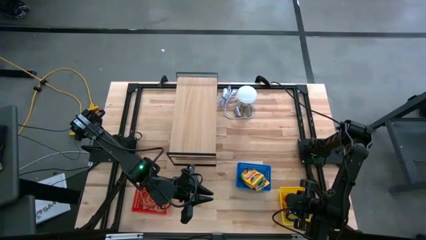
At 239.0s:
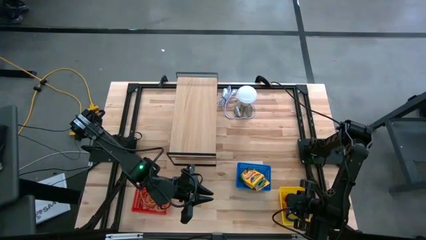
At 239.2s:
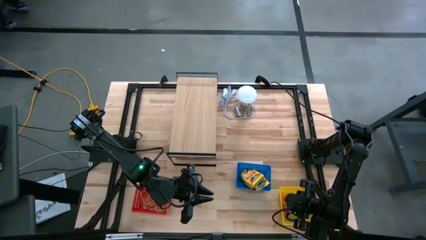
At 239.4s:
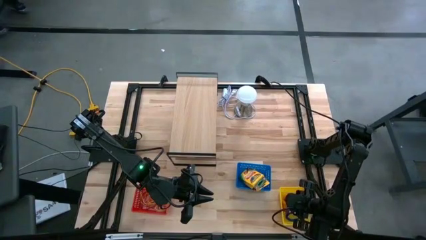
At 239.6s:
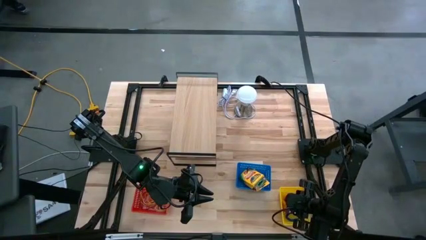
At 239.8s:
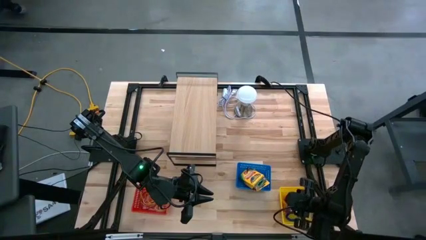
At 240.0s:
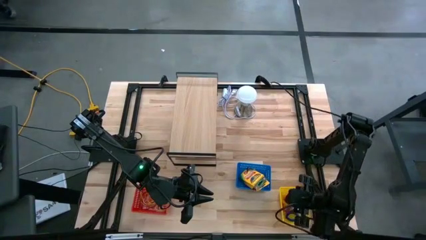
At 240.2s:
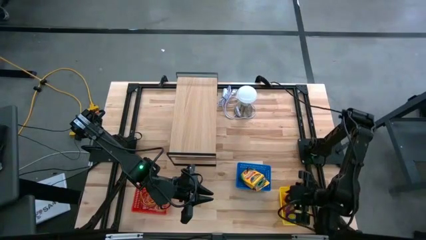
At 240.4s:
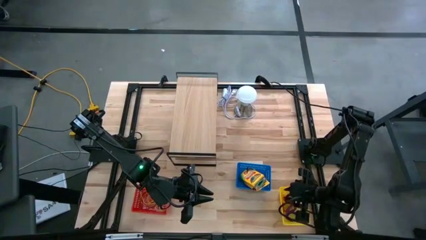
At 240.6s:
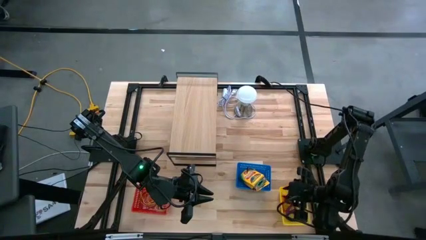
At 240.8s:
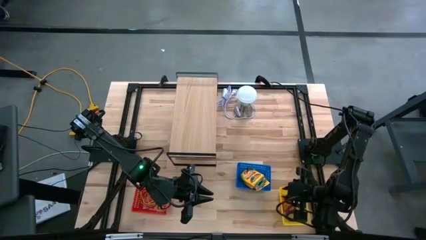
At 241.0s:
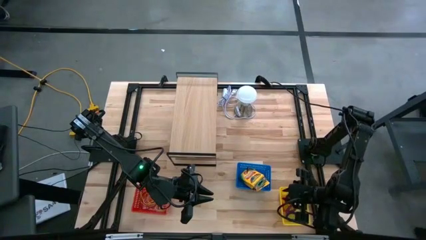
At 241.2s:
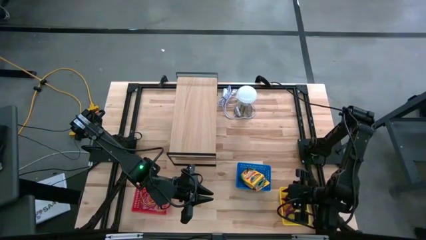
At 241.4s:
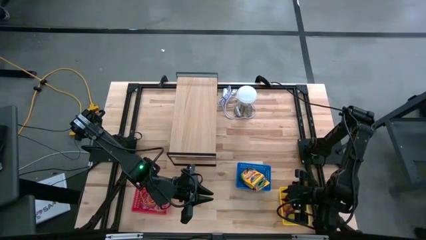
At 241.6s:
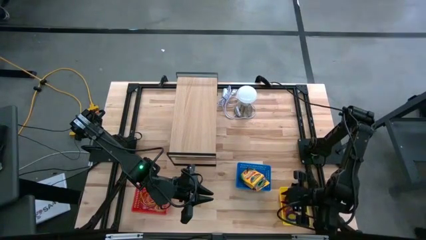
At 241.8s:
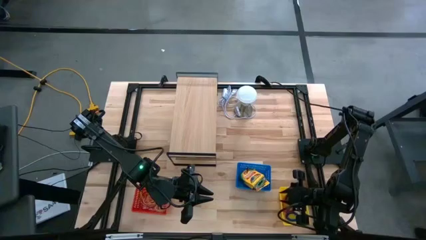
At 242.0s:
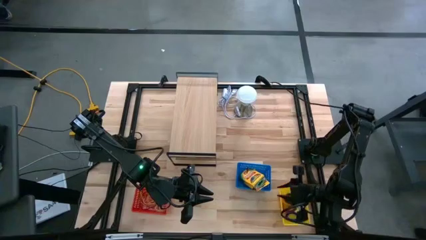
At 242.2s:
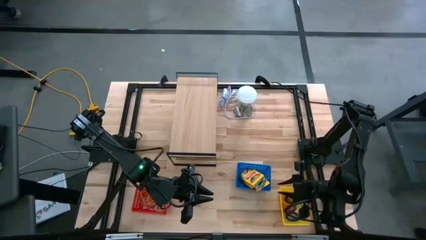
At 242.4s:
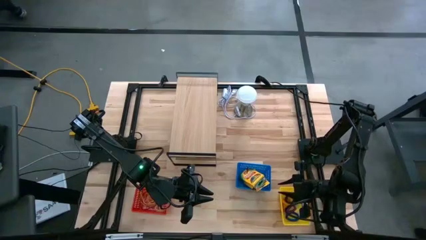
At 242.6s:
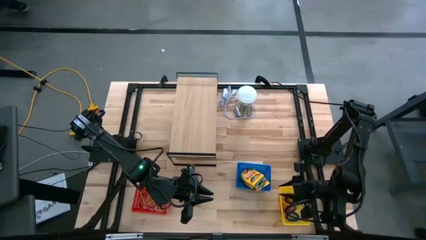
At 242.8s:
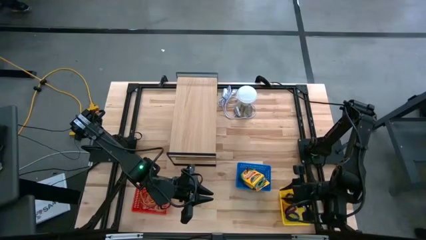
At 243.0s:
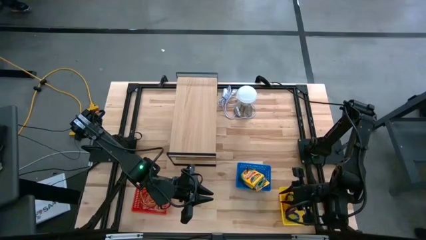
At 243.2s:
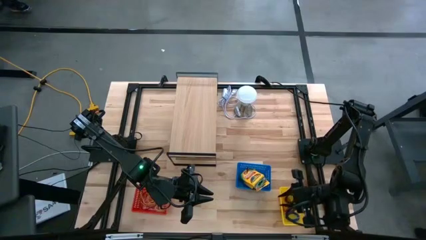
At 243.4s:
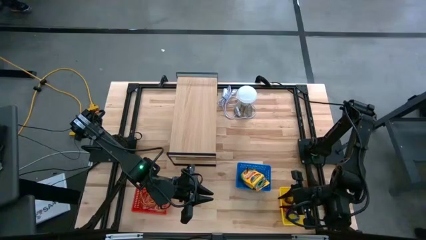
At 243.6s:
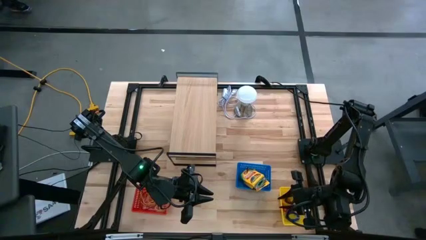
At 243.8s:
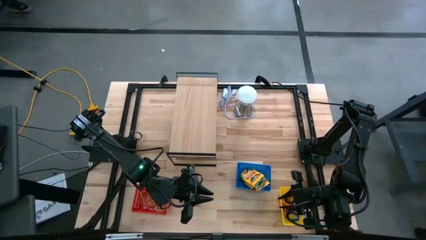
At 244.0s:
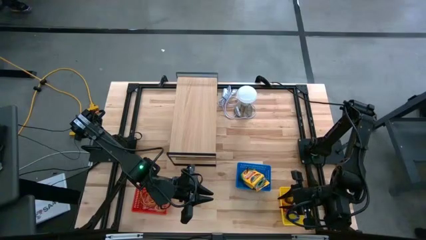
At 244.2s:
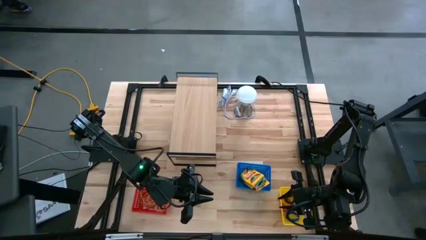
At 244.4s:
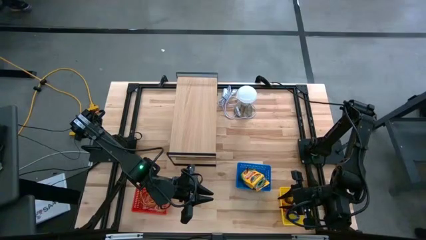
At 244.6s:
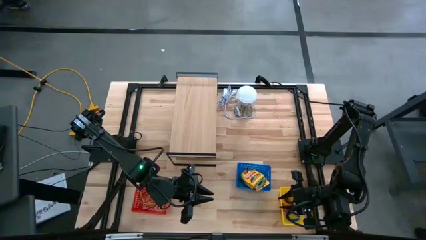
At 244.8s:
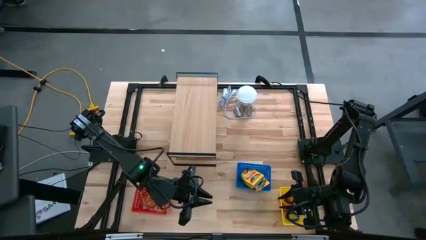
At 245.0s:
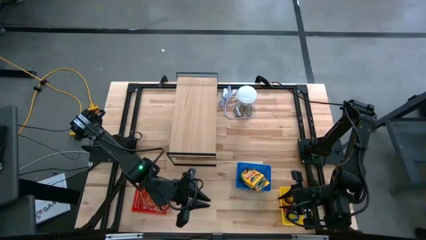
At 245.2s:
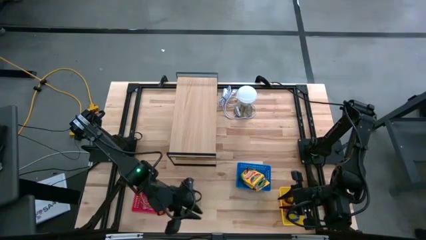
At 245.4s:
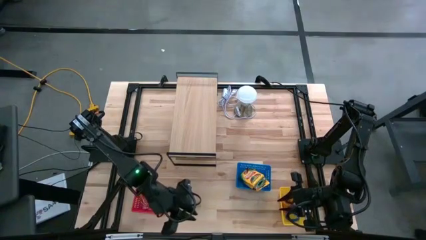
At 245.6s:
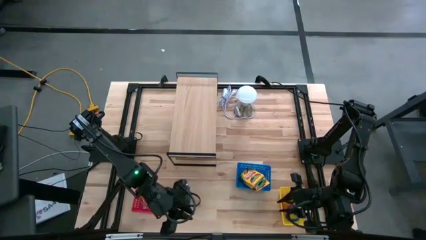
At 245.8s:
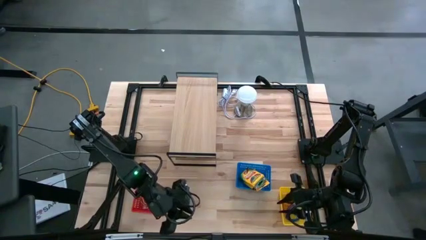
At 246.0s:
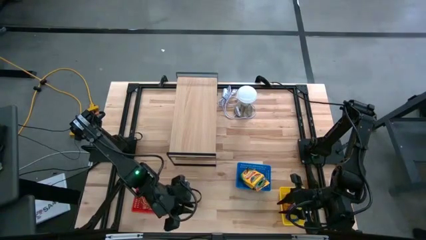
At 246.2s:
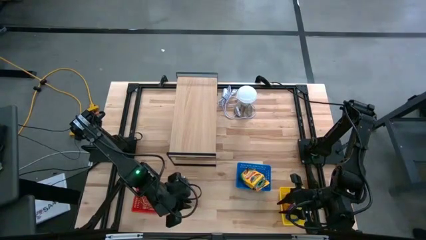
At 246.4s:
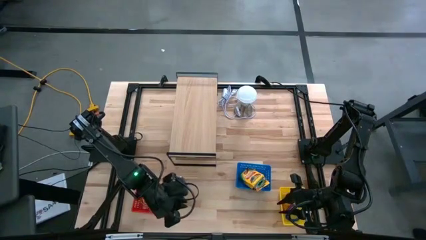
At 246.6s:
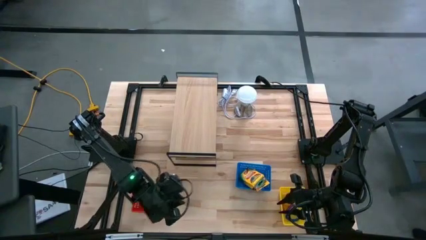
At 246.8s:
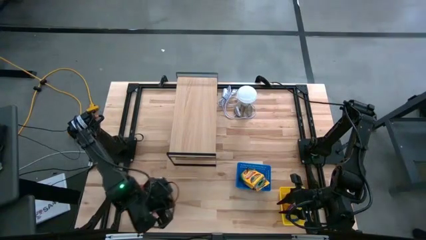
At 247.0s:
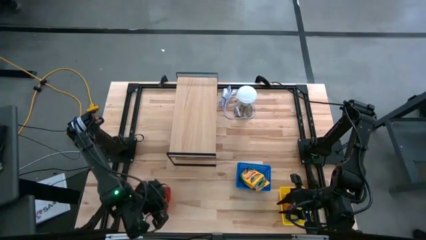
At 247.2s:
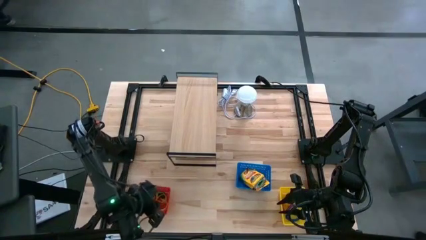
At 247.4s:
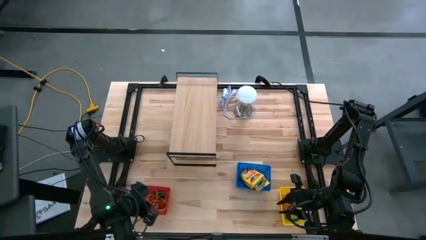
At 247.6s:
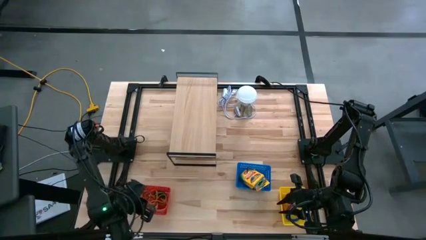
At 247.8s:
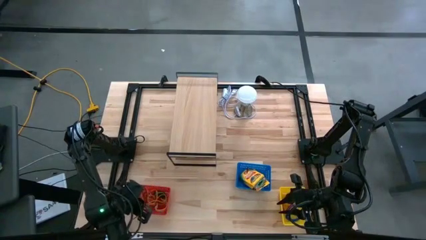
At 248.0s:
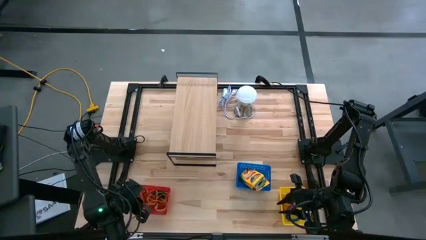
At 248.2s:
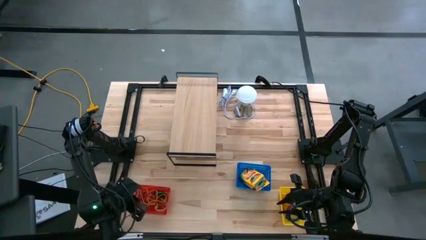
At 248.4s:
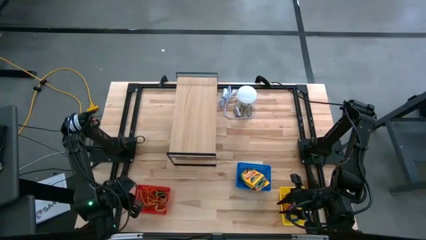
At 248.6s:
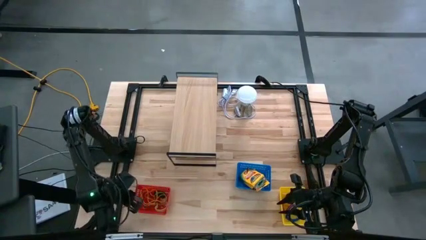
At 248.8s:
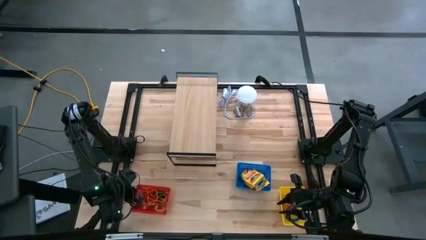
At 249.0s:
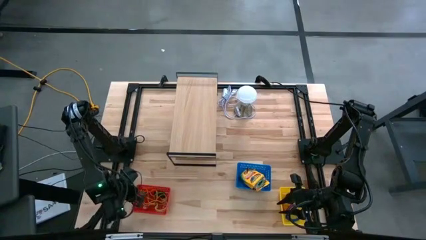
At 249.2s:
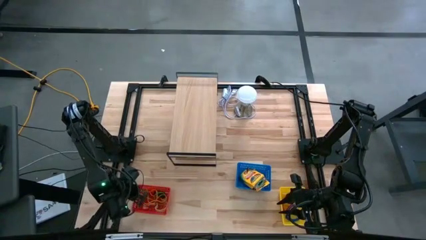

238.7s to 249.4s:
Task: Pick & Place Office Desk Supplies
Put the red bin on the shelf

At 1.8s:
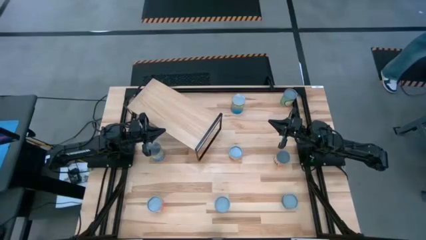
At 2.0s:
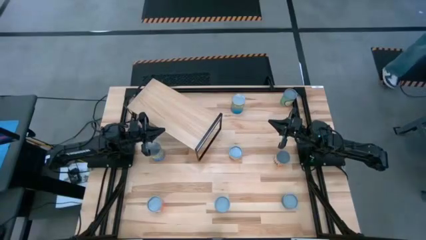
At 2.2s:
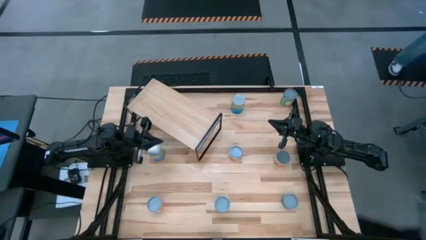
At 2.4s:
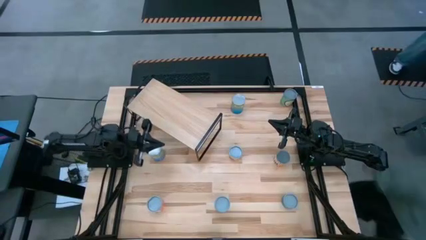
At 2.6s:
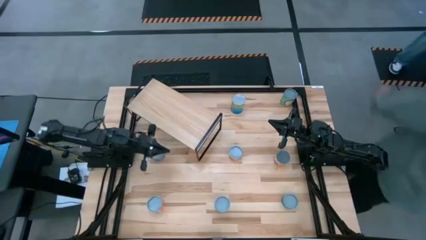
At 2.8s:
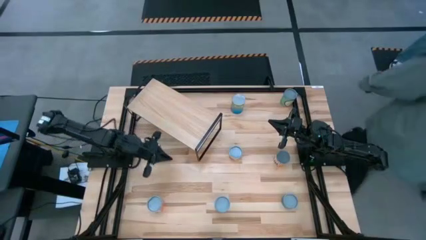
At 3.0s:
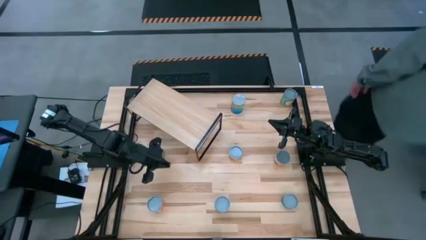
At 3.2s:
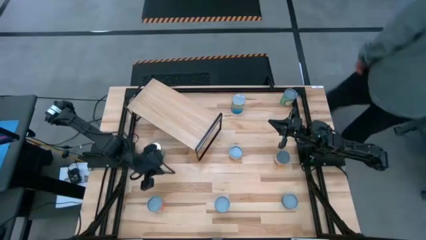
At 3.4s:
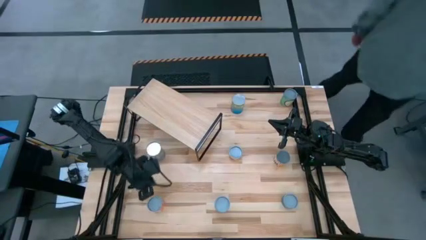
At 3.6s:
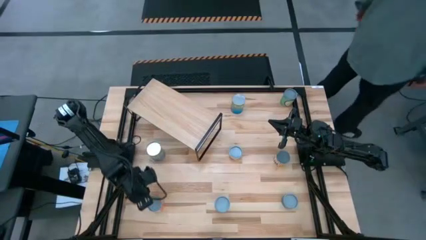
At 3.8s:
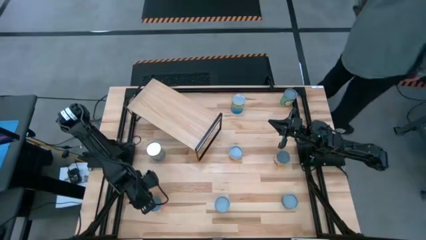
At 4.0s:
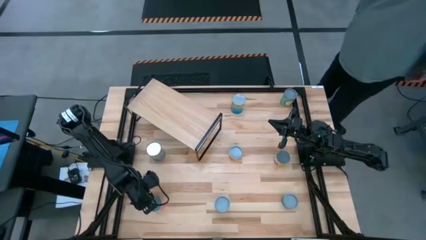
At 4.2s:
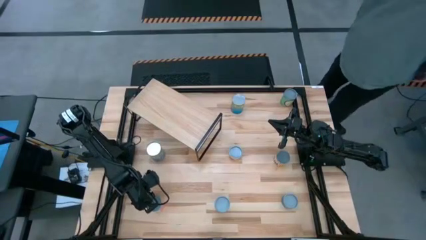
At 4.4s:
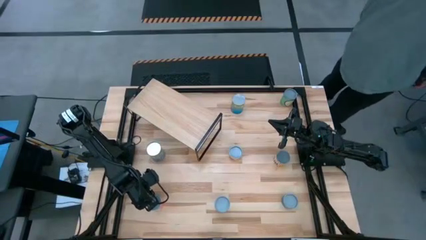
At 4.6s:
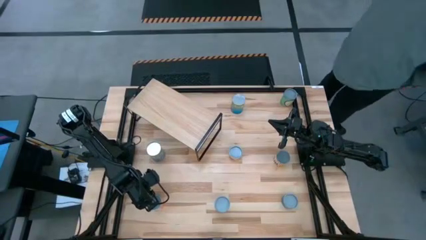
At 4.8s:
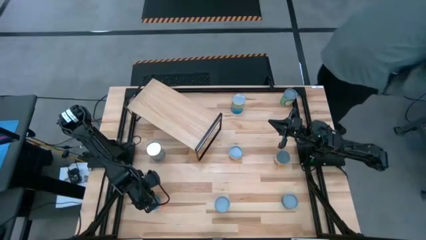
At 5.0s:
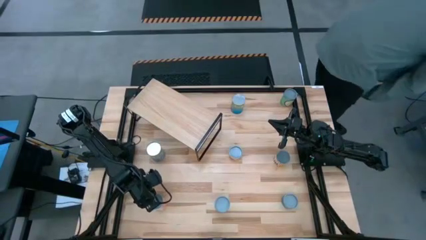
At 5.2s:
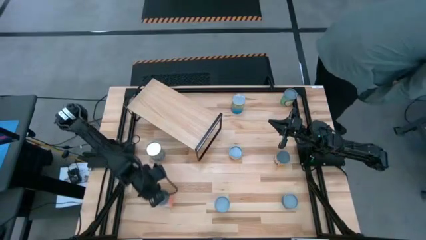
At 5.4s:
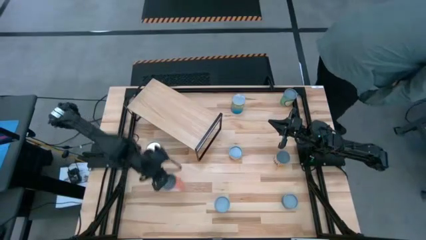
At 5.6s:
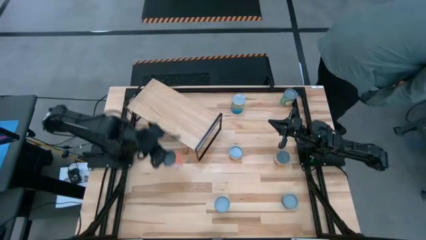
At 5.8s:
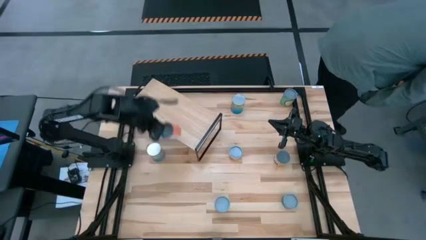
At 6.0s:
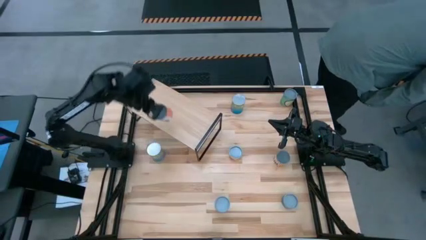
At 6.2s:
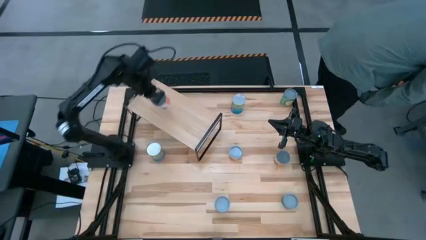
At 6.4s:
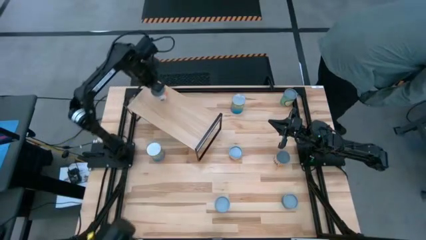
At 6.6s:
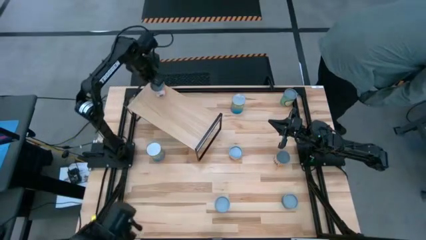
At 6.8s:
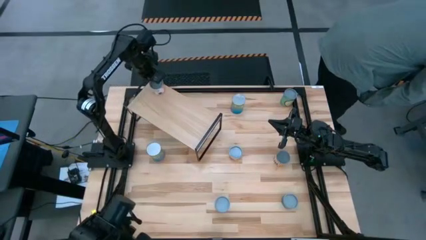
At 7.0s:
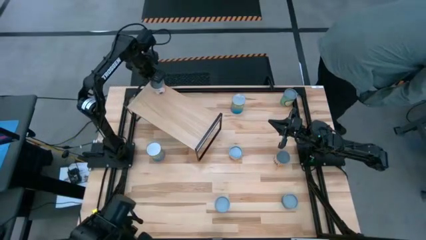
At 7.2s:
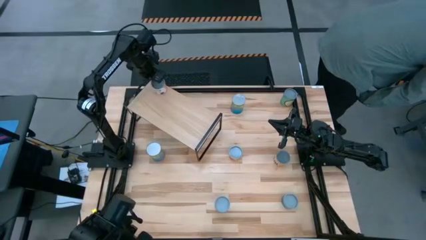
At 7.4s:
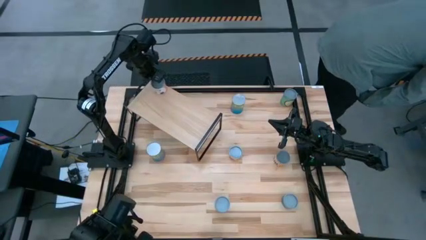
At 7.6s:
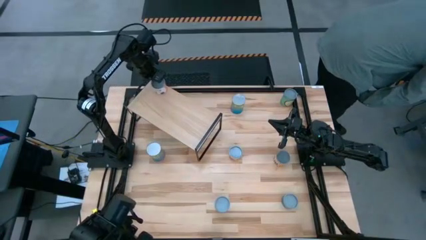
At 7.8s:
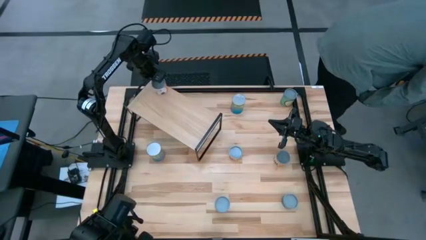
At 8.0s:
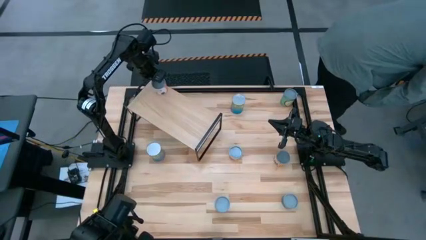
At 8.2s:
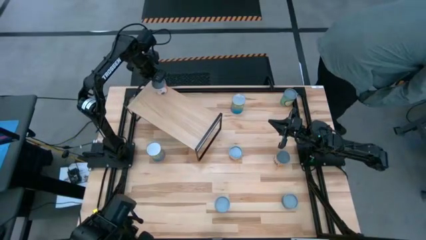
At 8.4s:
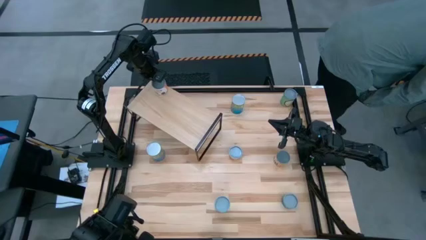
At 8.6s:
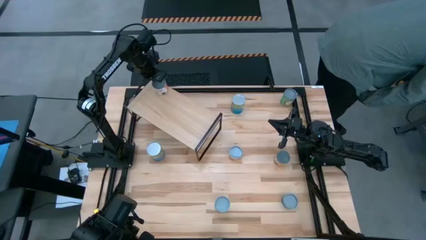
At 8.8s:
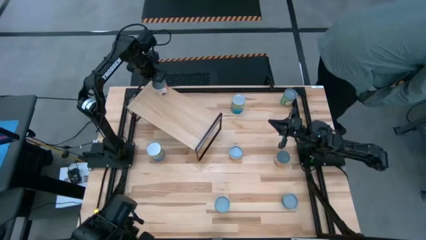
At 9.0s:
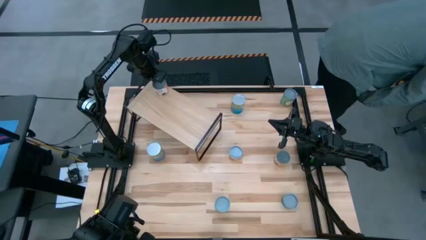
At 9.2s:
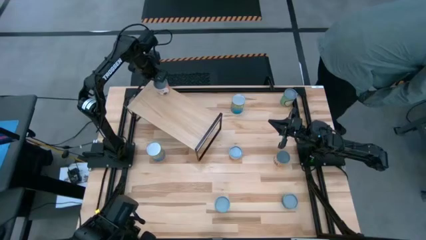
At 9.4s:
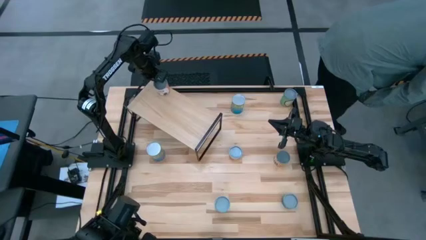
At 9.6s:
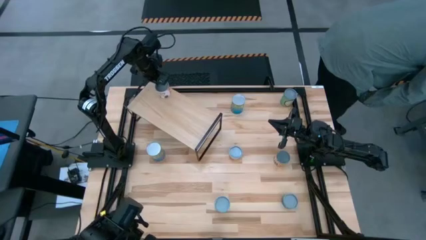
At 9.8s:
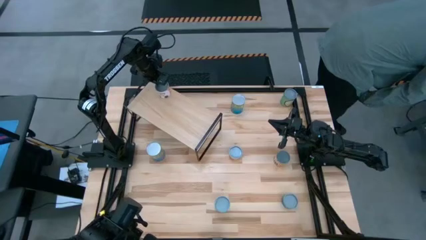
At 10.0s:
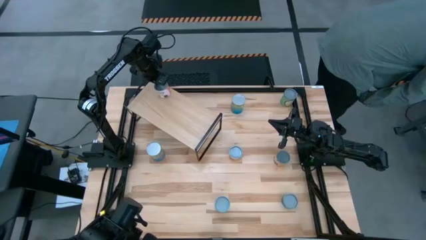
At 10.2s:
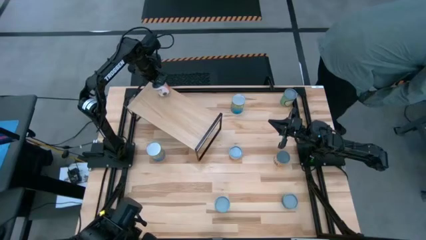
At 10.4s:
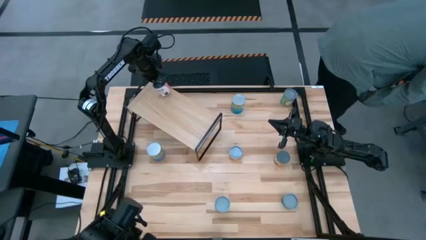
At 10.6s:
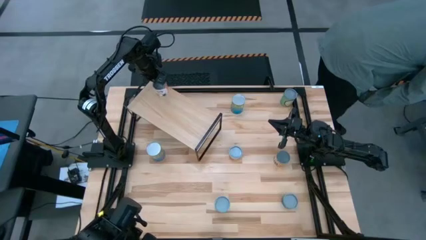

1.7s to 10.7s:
Task: Pick and place cans onto a shelf
Put the canned saucy meatballs on the shelf
